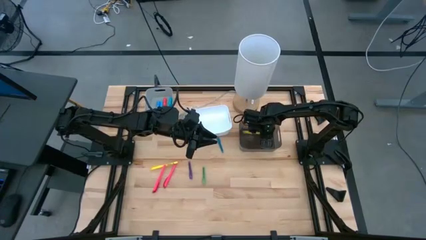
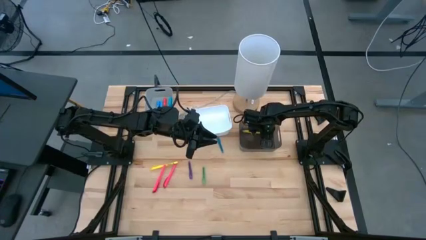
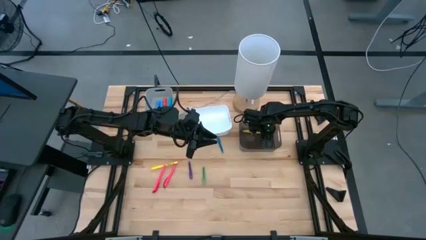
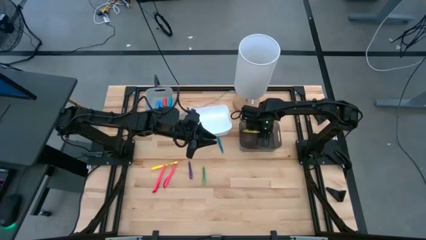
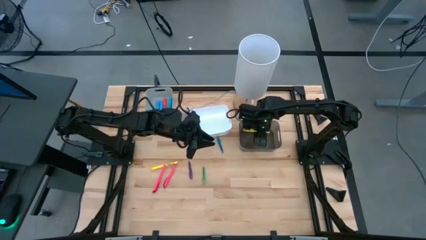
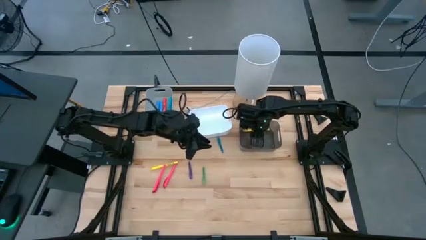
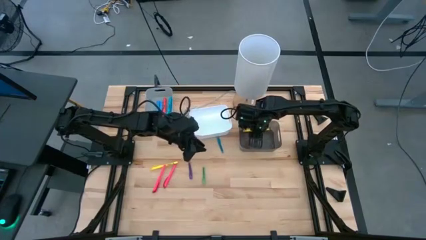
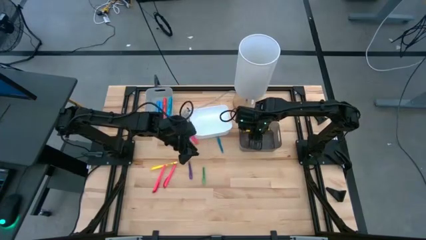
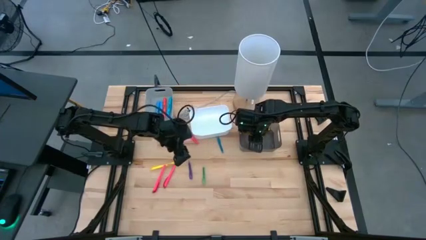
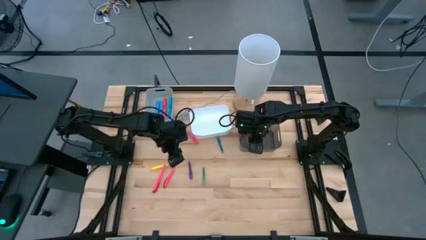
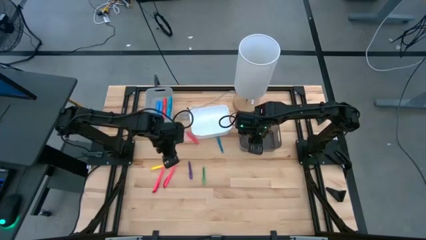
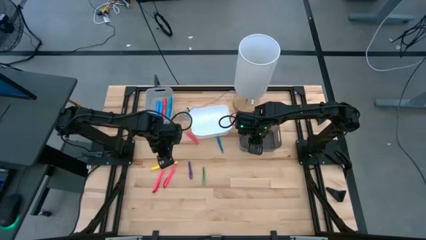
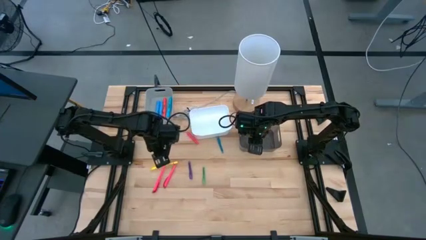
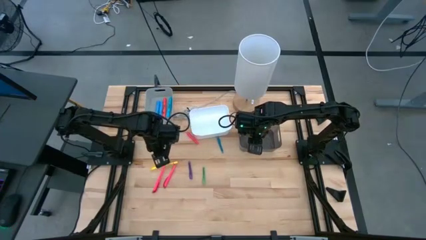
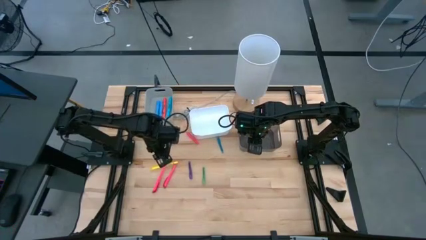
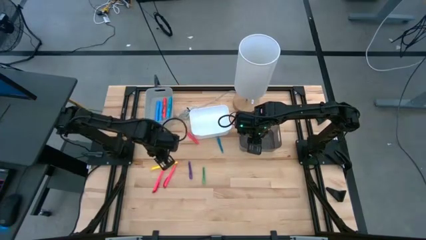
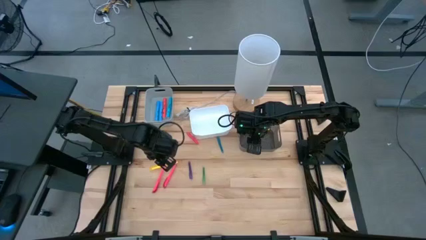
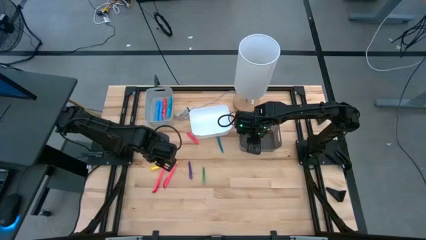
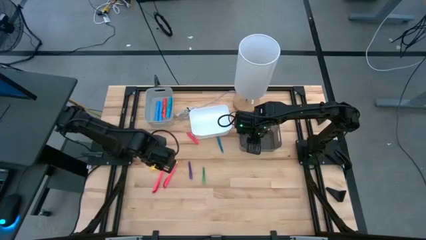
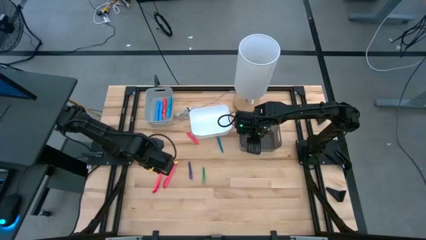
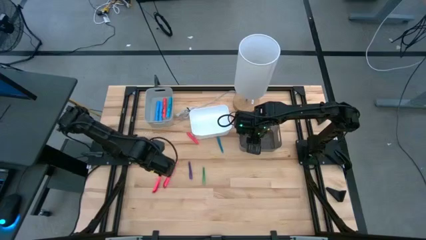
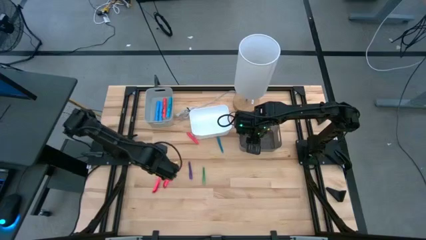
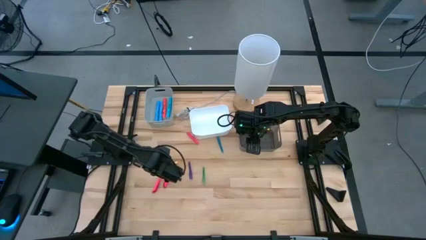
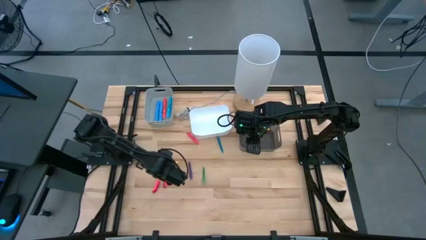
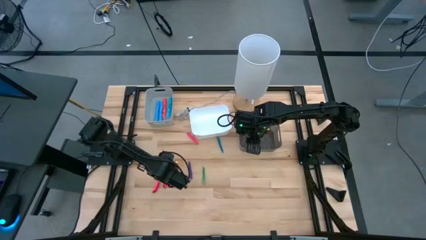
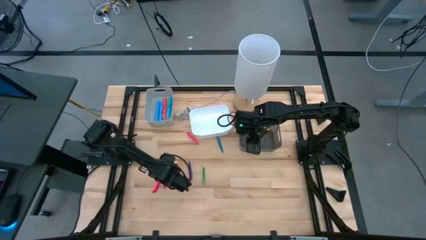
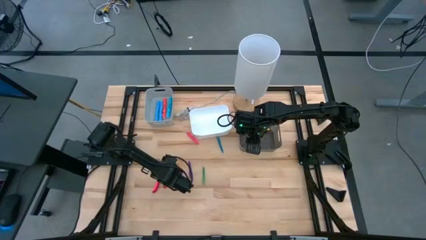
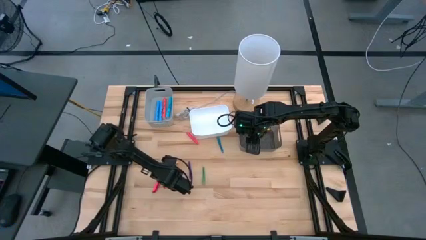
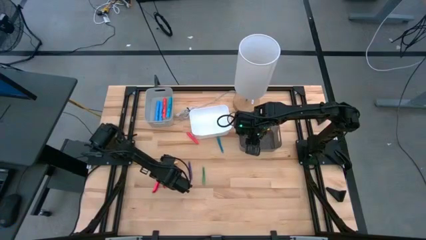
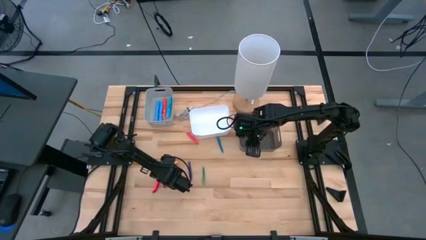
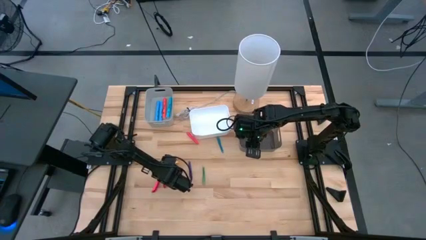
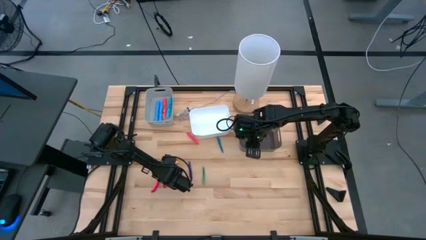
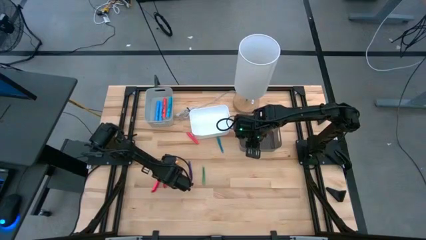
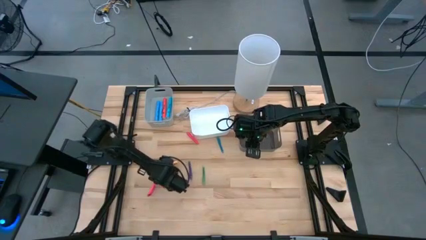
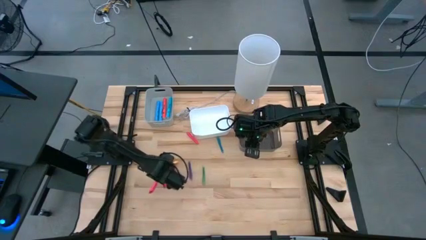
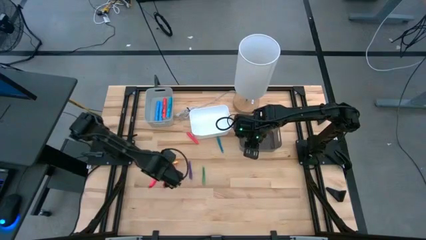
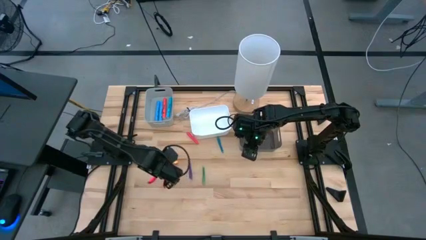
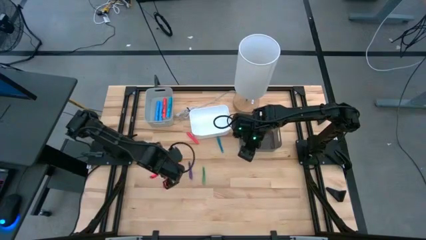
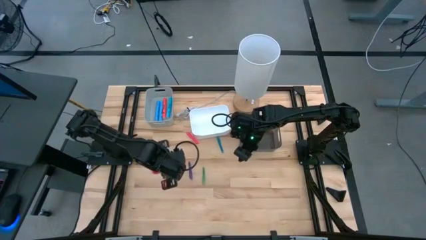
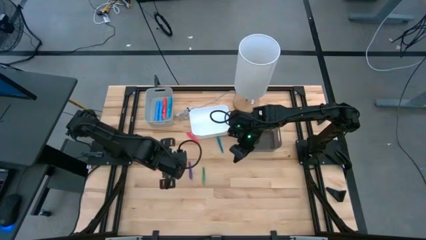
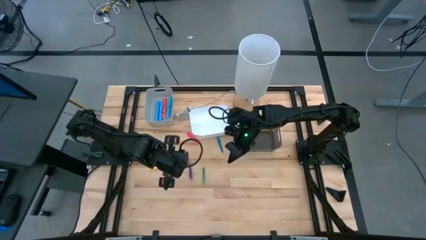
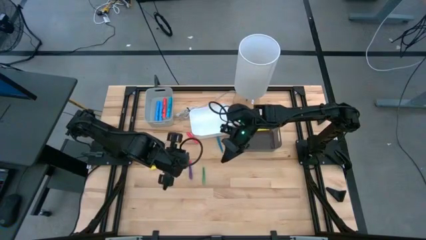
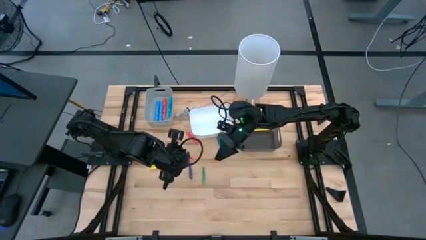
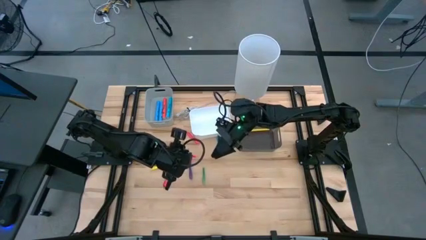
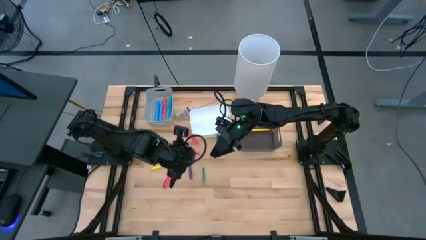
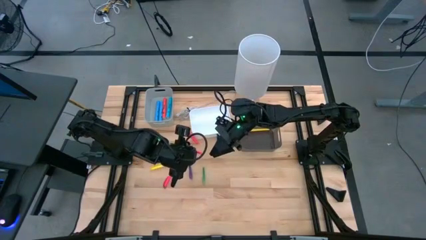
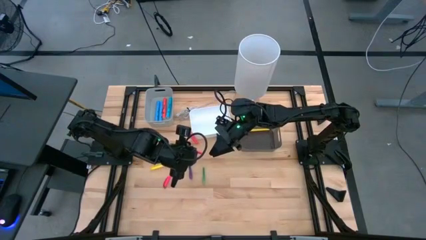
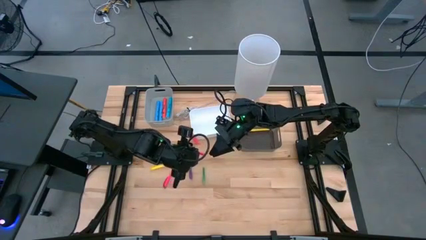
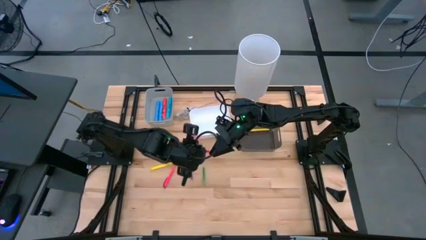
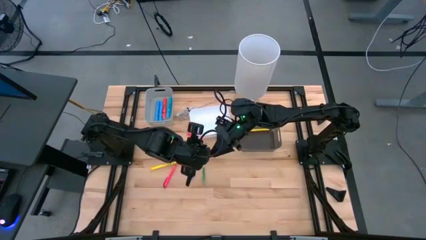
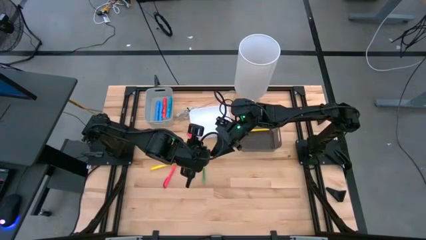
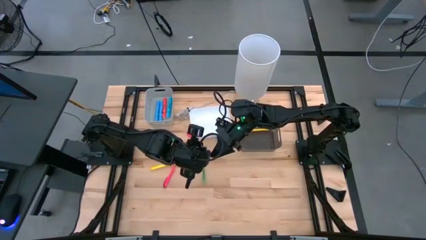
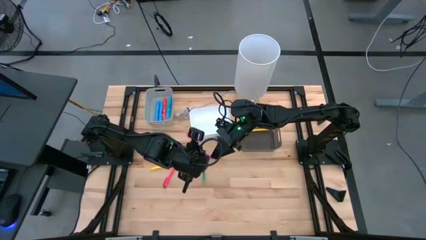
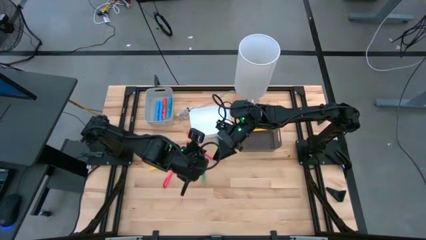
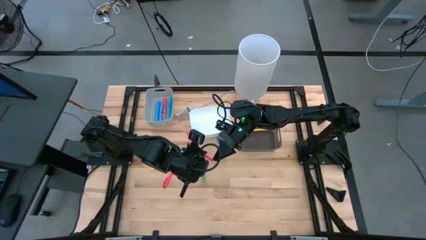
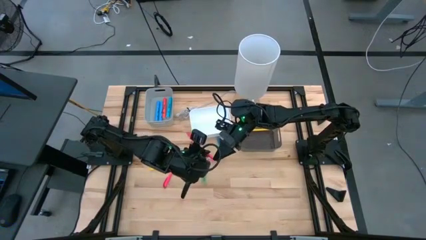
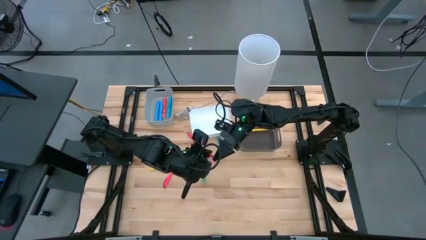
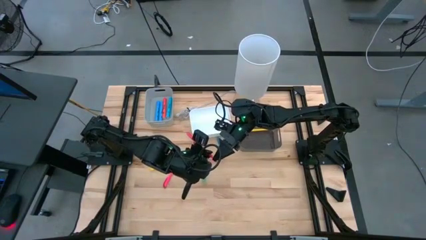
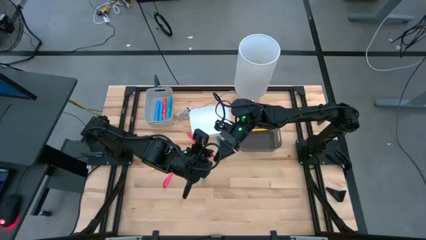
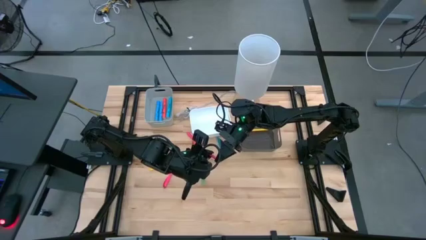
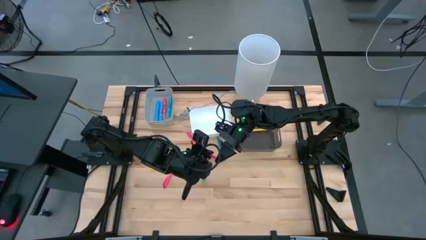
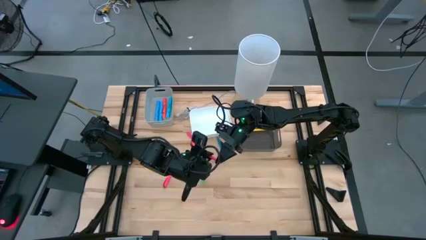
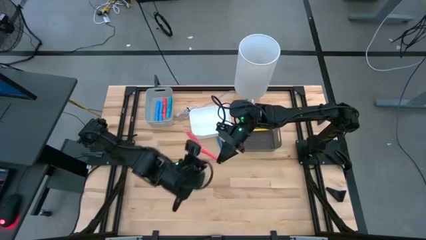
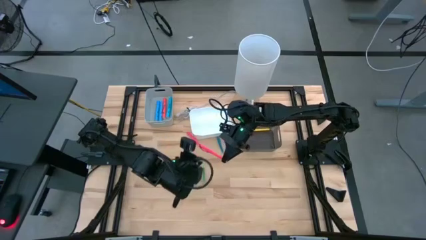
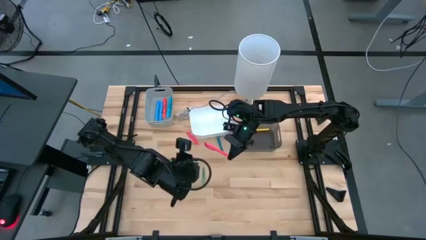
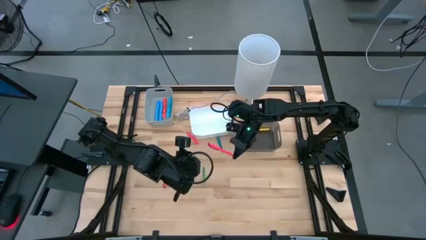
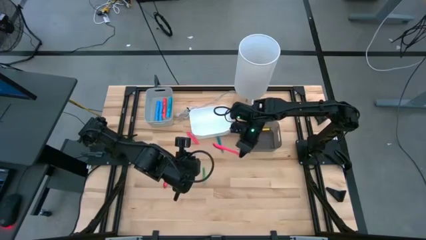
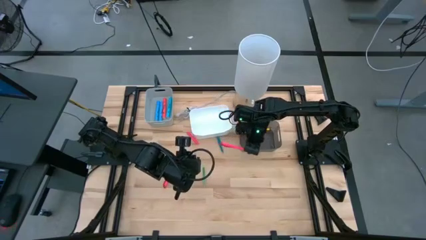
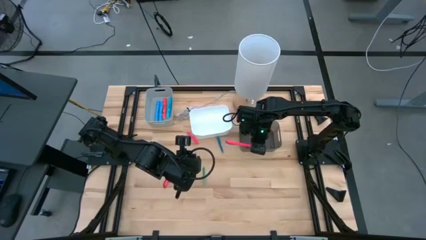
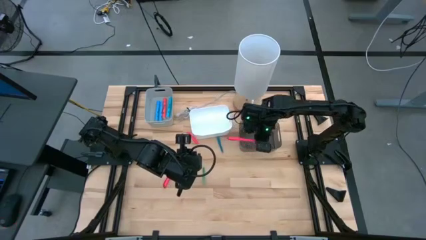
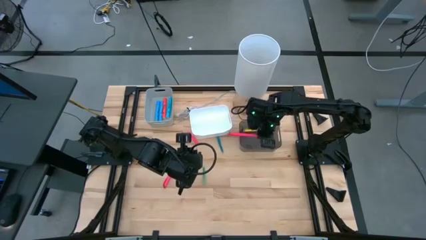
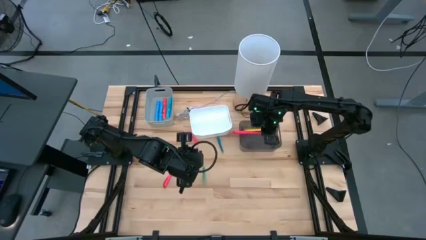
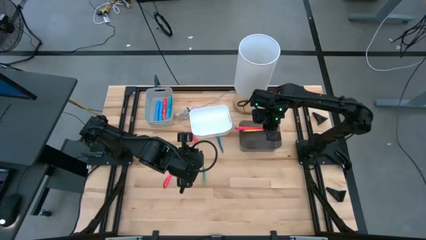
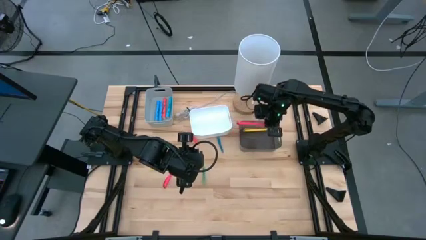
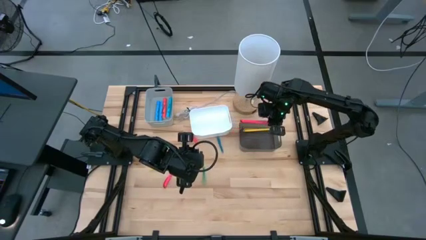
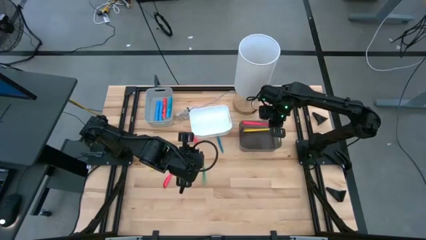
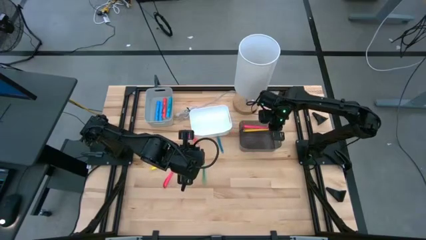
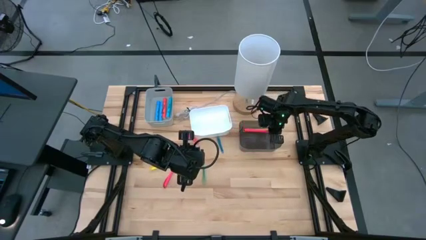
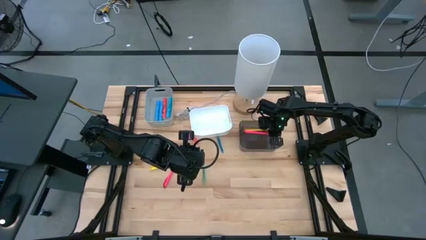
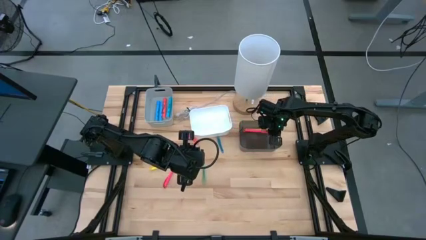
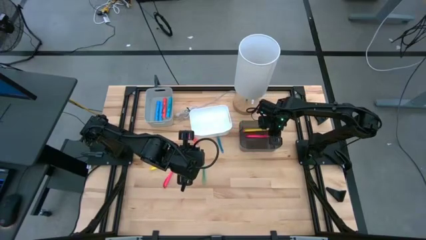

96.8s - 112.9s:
Task: Pick & Place Markers
Put the left pink pen into the black transparent bin
